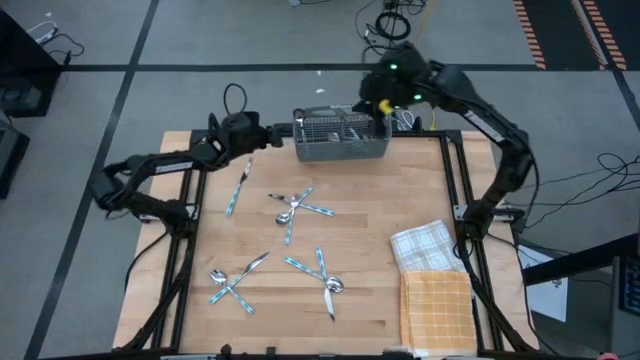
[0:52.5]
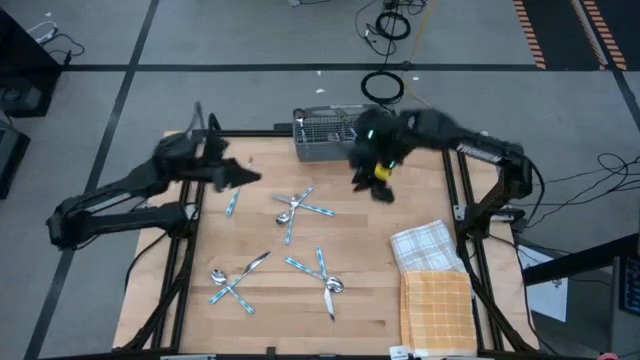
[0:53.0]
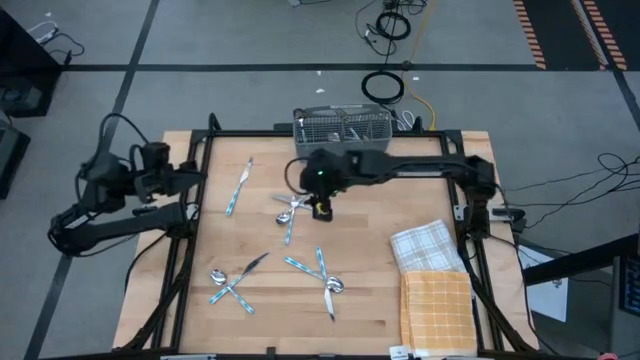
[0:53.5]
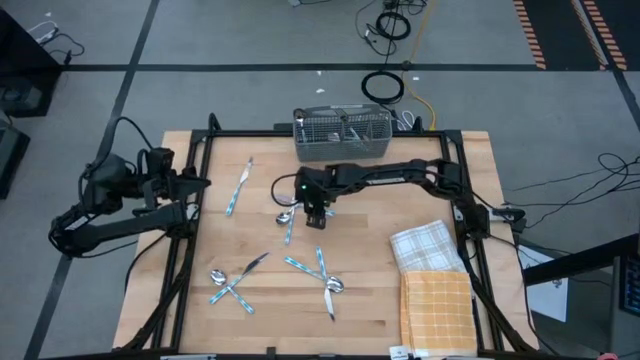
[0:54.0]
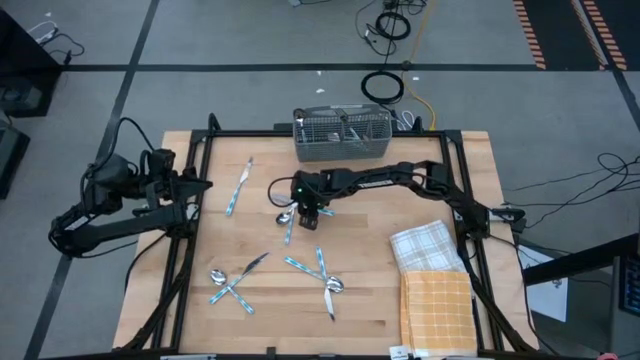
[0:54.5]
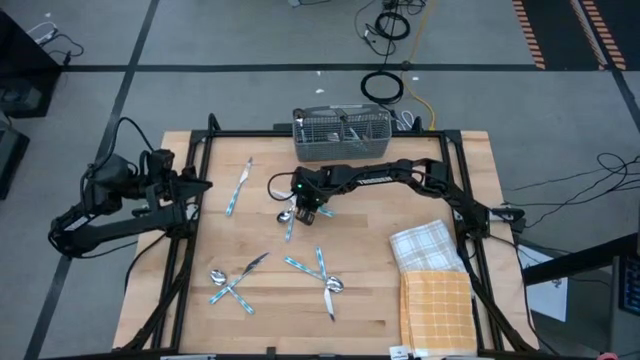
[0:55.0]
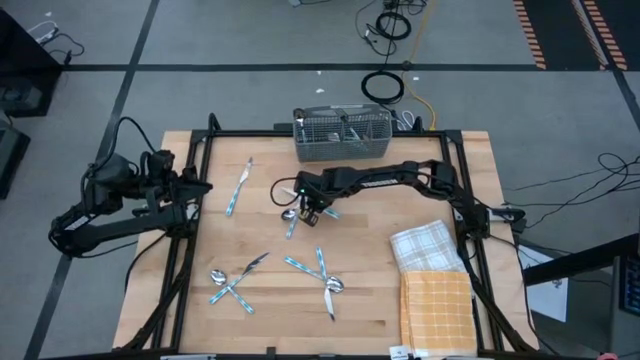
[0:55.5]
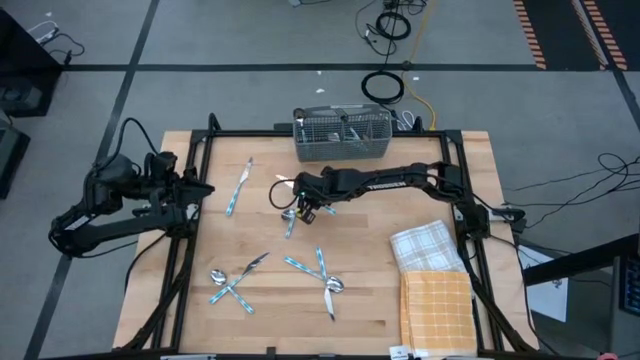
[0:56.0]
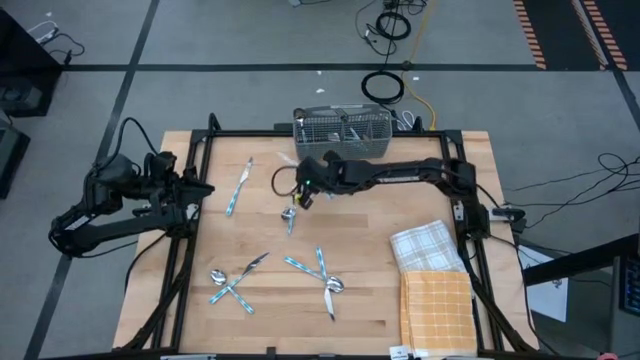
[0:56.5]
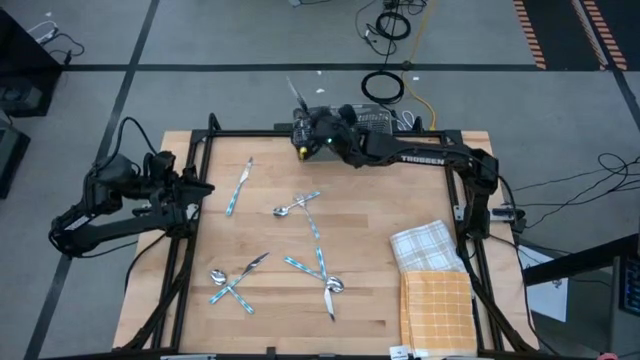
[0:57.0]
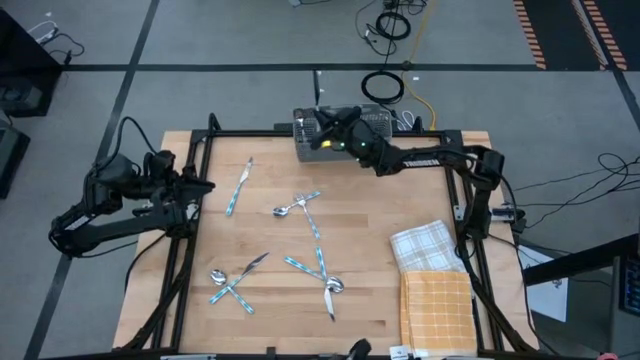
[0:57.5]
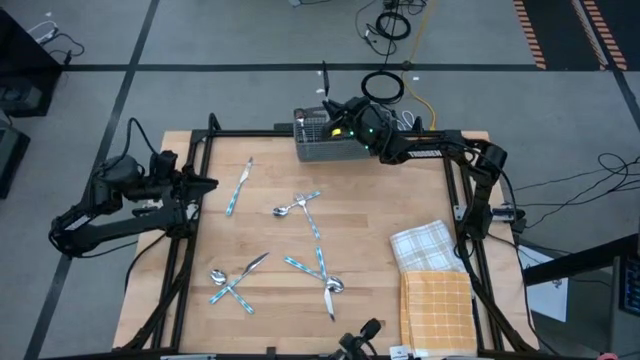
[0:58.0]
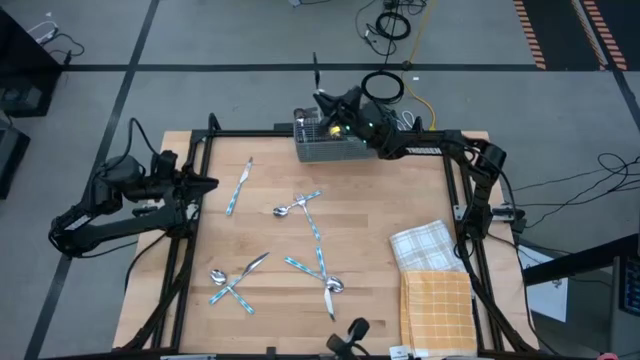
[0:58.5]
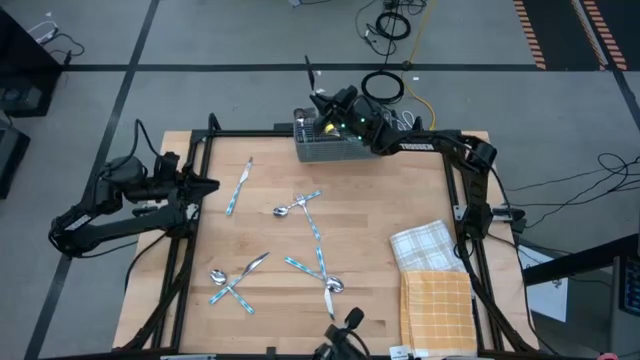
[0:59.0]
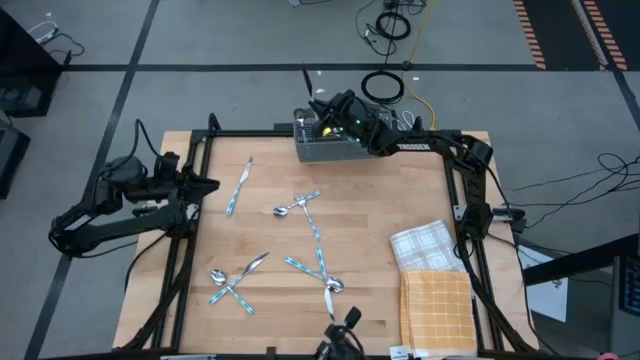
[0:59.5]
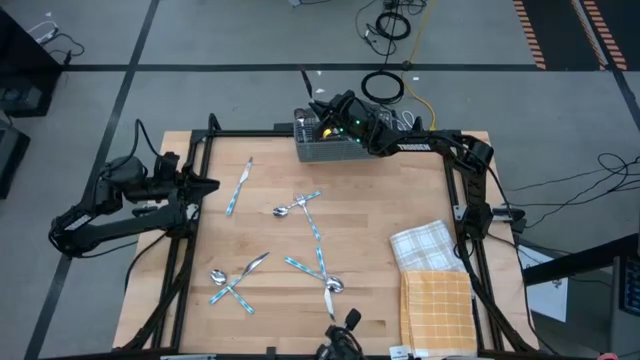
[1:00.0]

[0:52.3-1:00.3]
Task: Sort silverware
Put the top right blue table knife into the gray silverware basket

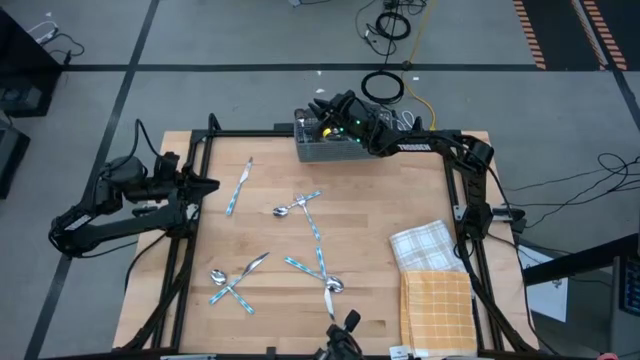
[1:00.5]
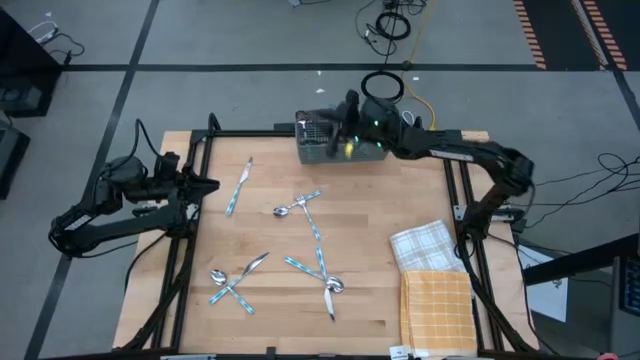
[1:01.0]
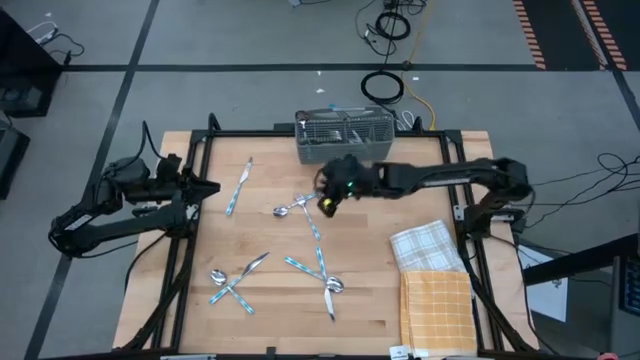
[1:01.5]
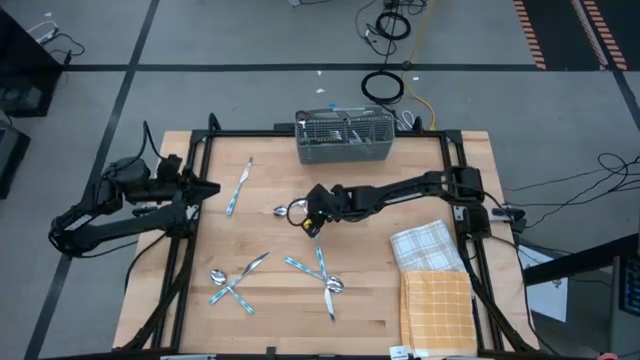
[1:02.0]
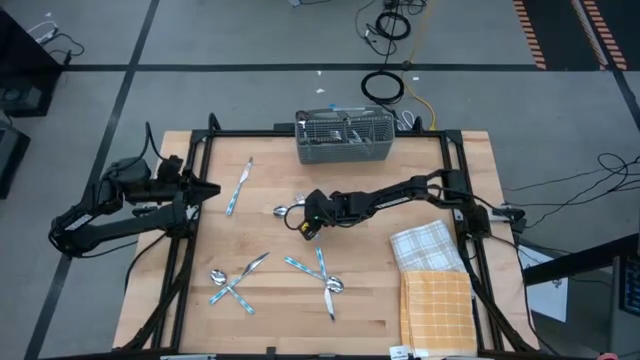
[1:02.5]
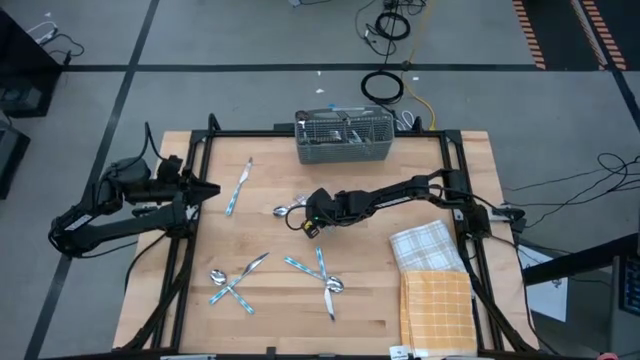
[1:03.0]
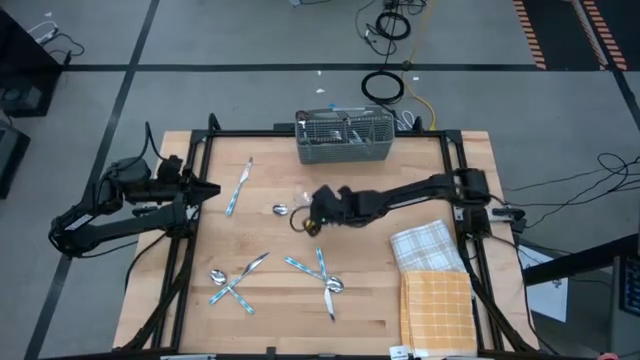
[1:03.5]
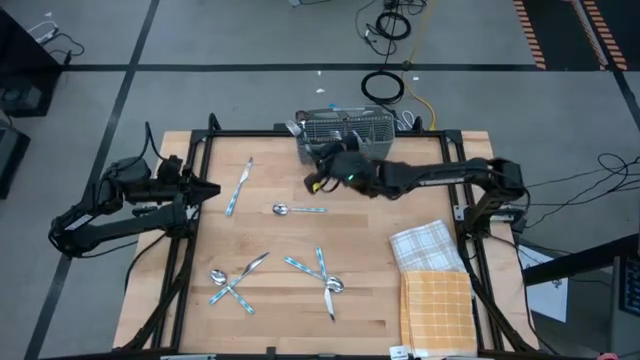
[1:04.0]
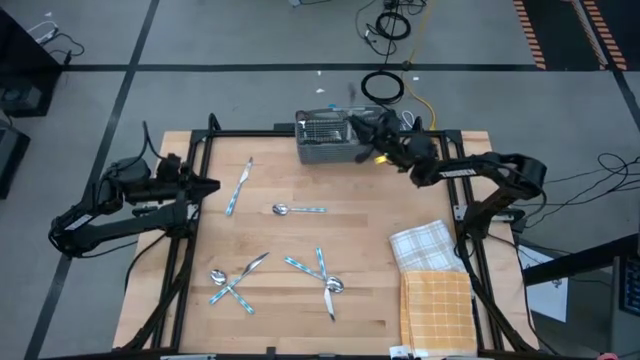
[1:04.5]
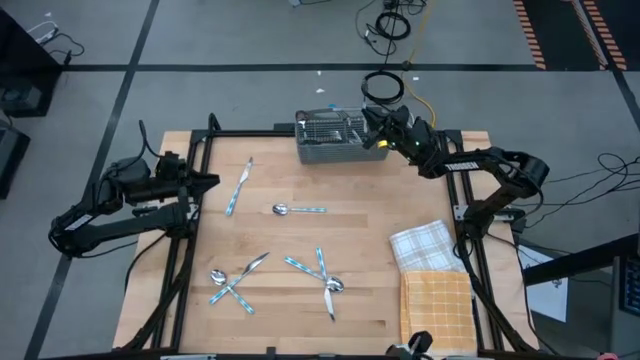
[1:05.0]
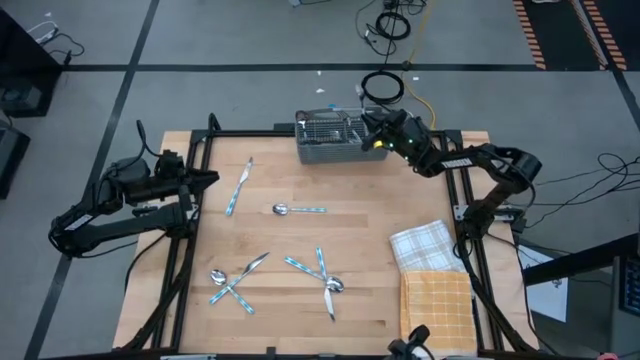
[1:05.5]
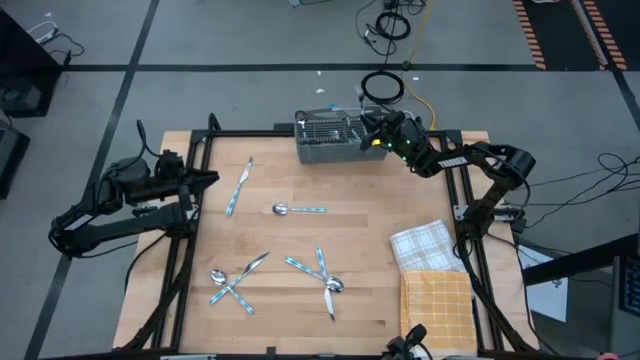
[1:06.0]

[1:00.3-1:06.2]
Put the blue fork into the gray silverware basket

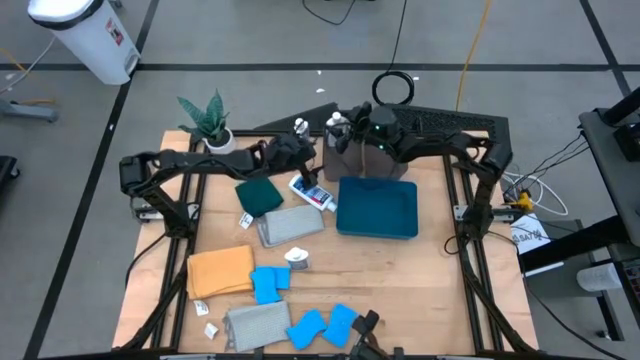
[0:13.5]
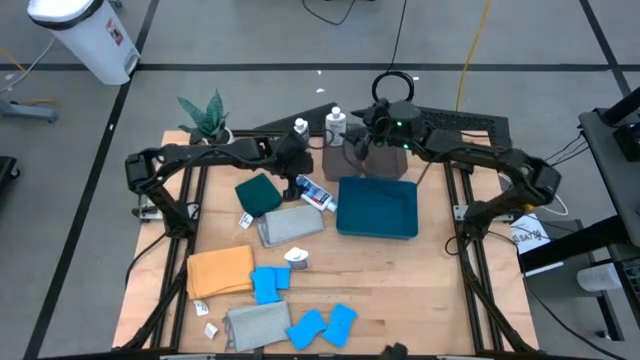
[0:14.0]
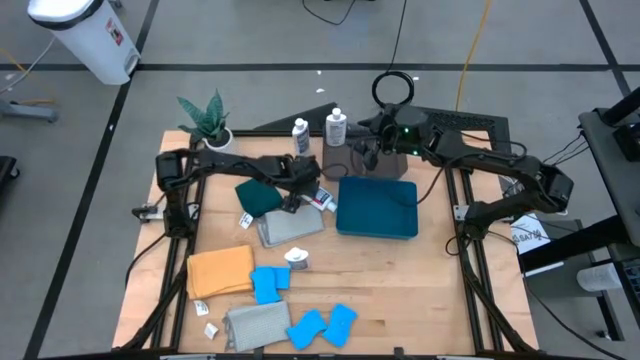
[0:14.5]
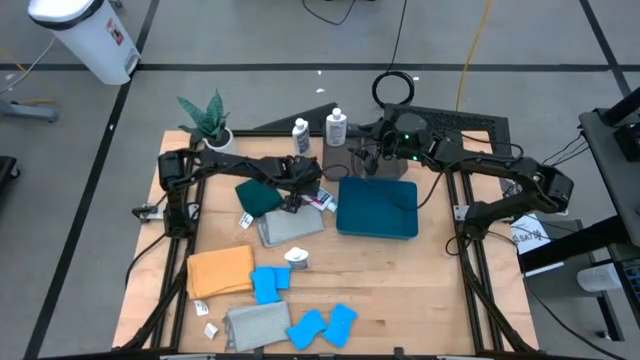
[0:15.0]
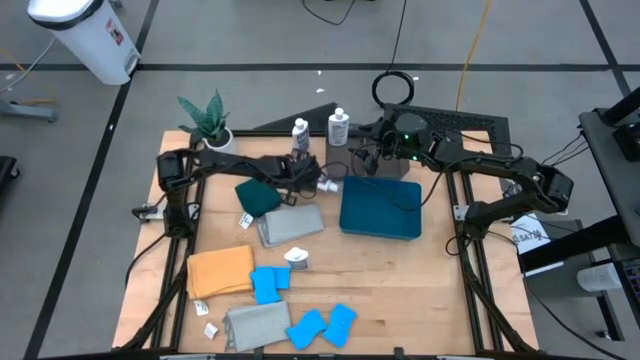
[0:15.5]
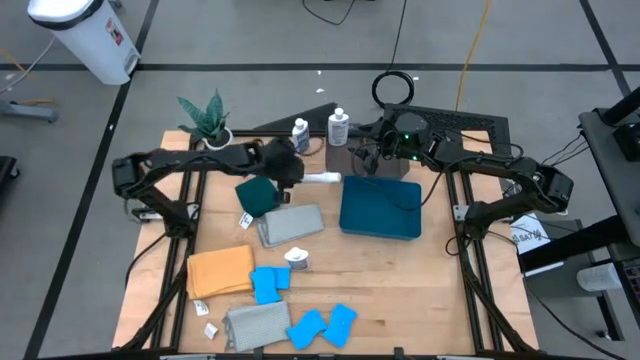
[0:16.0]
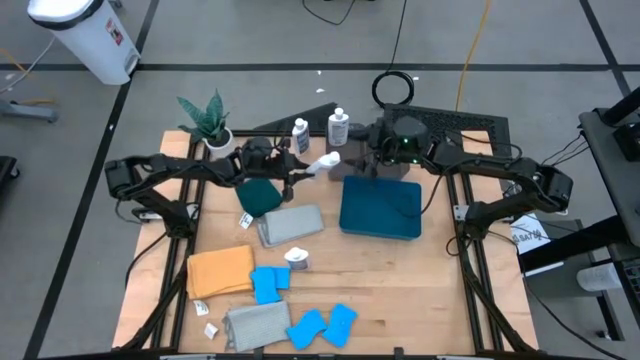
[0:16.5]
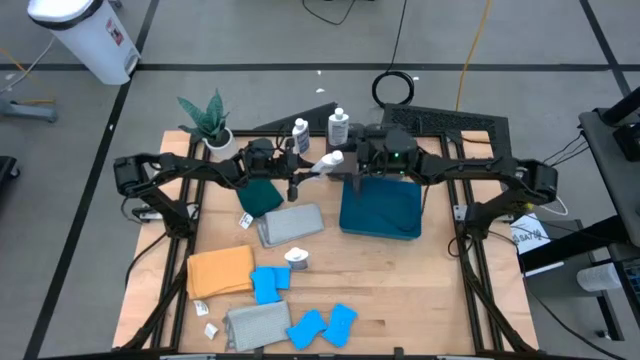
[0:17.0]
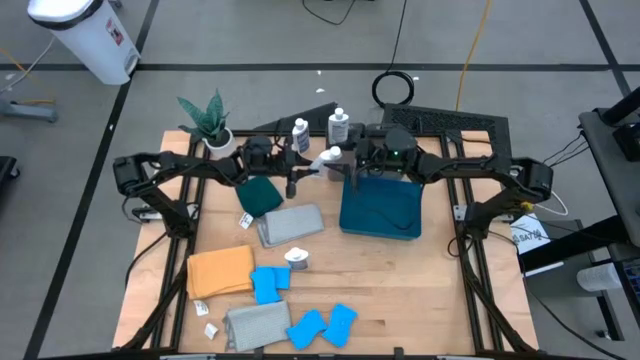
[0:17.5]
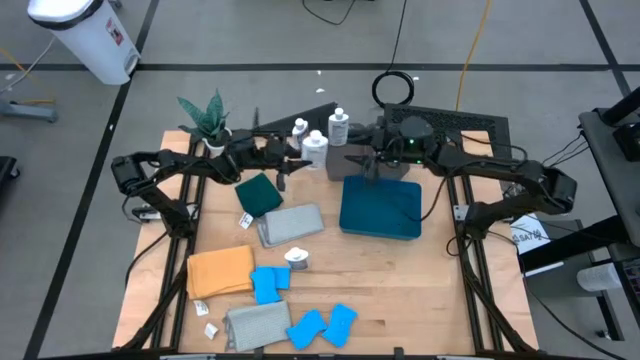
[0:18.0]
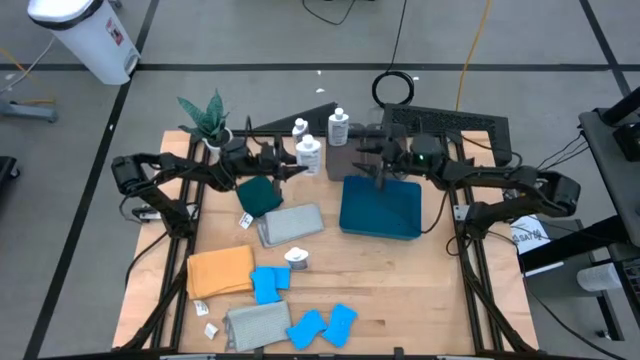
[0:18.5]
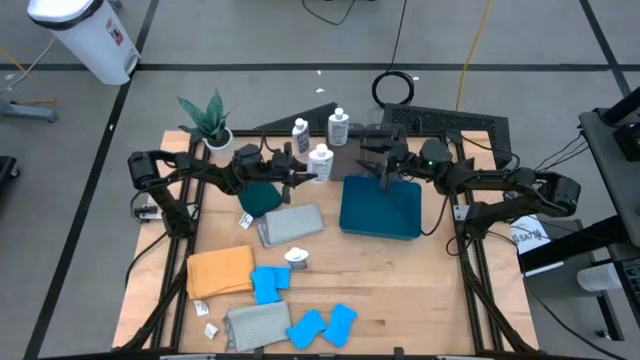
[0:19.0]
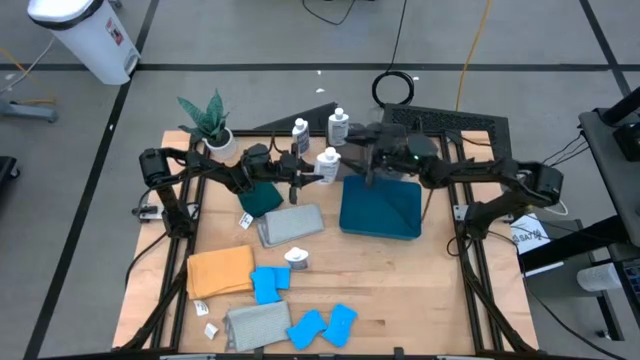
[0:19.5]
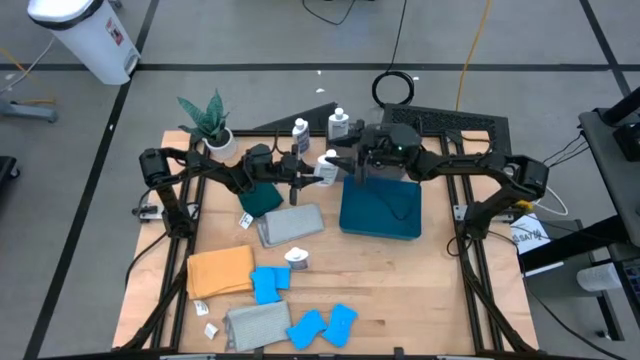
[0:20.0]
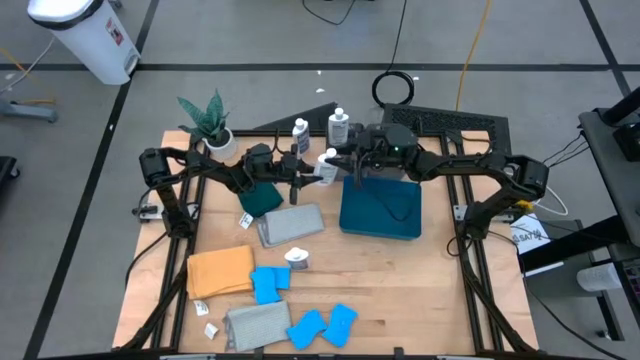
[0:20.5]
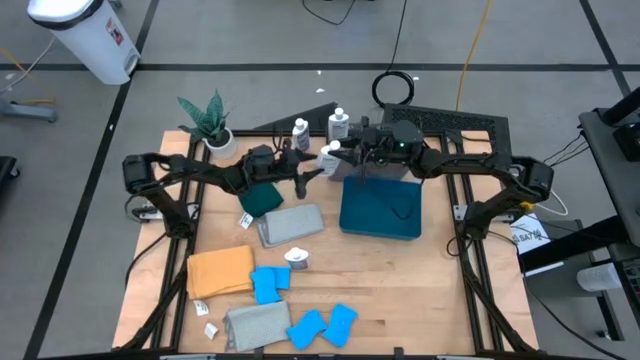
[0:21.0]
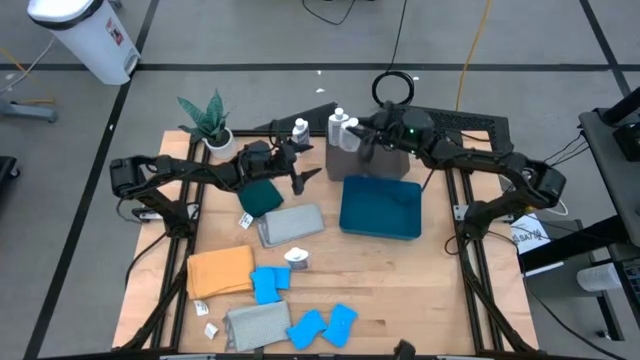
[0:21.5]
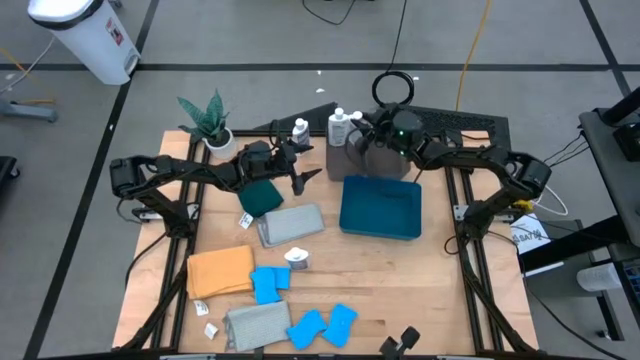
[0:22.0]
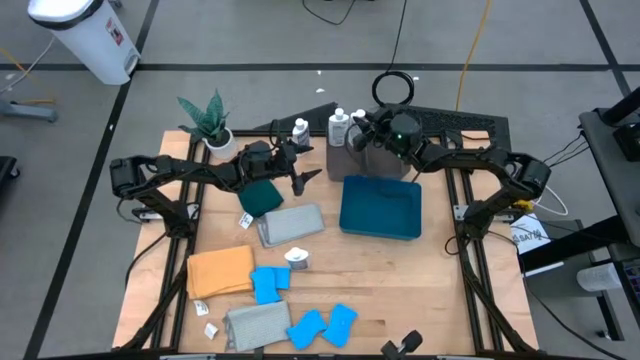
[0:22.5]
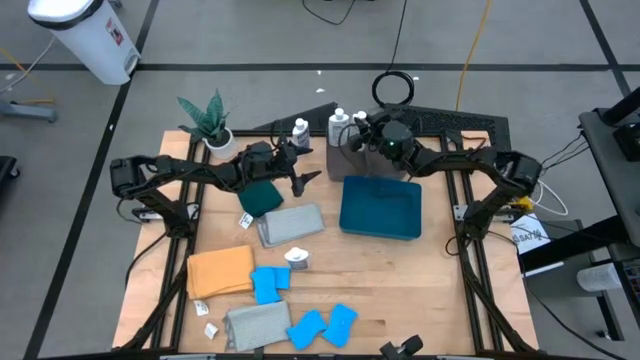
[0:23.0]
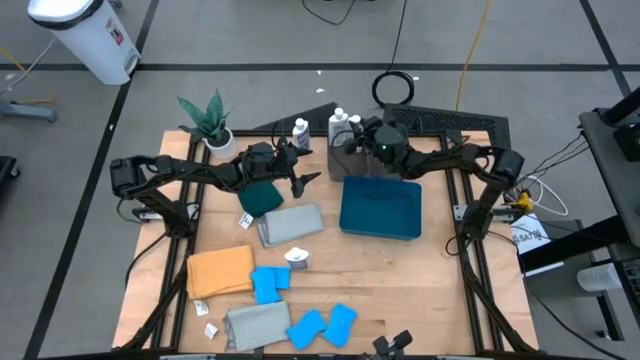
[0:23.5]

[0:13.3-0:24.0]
Task: Pick & Place Kitchen Items
Put the white clear plastic restorer into the left black bin
